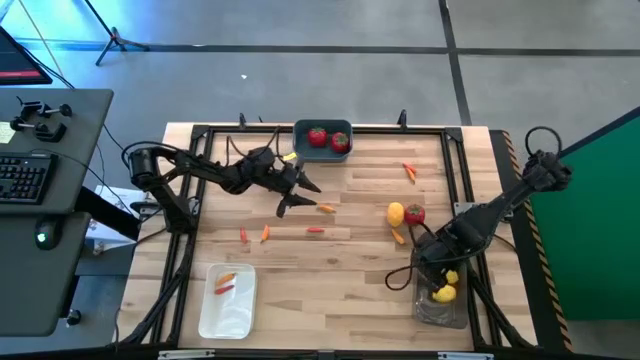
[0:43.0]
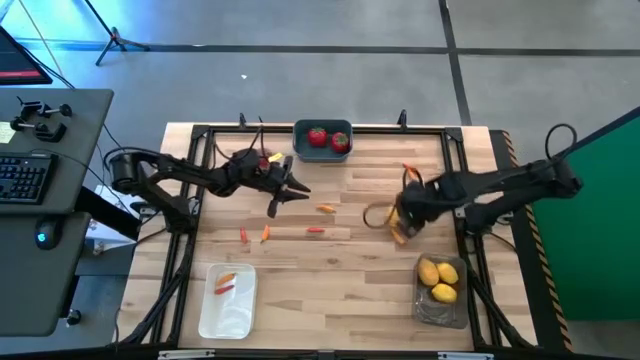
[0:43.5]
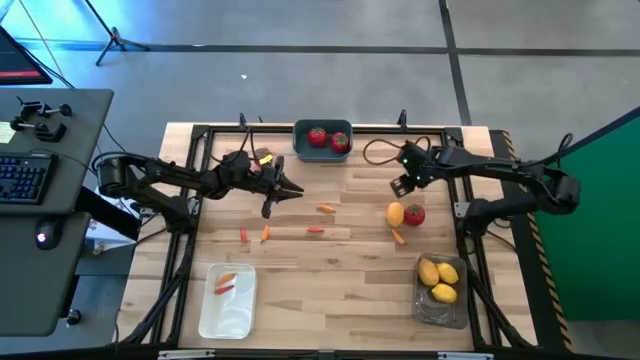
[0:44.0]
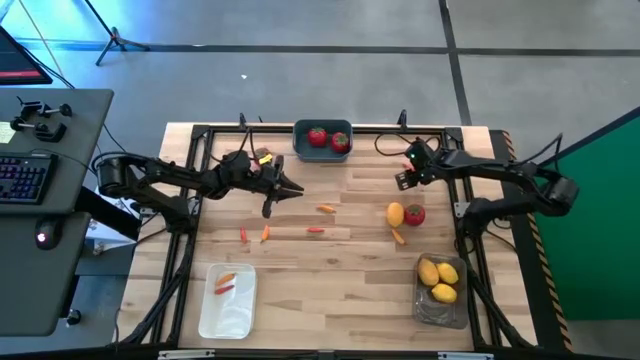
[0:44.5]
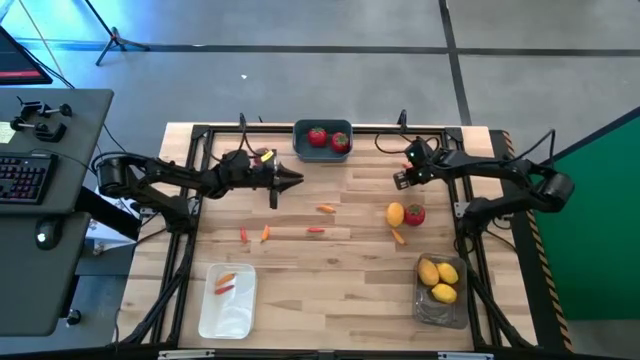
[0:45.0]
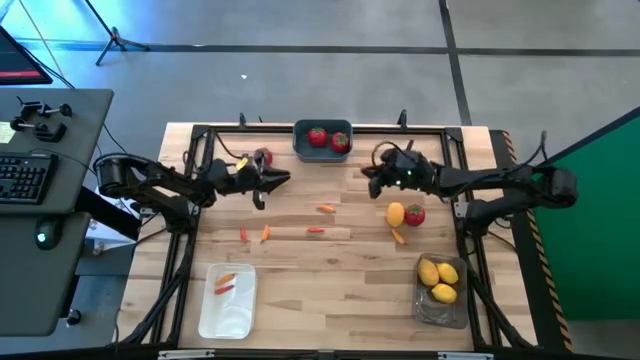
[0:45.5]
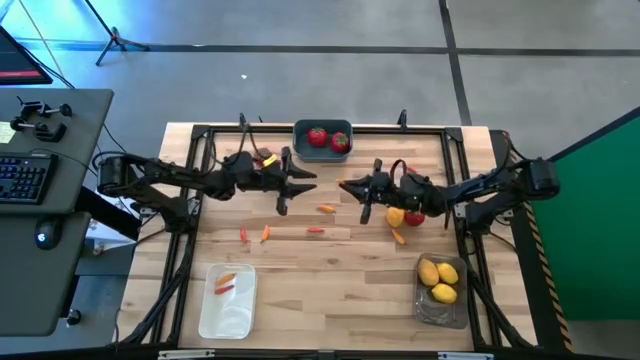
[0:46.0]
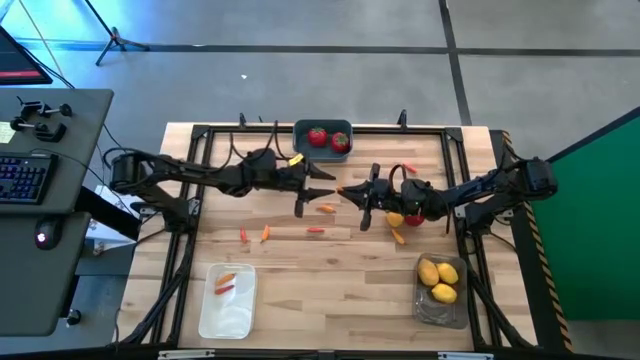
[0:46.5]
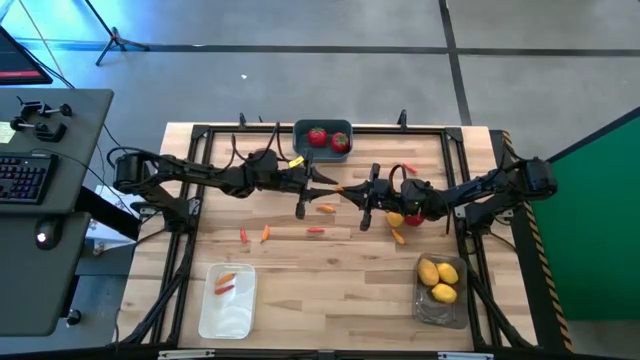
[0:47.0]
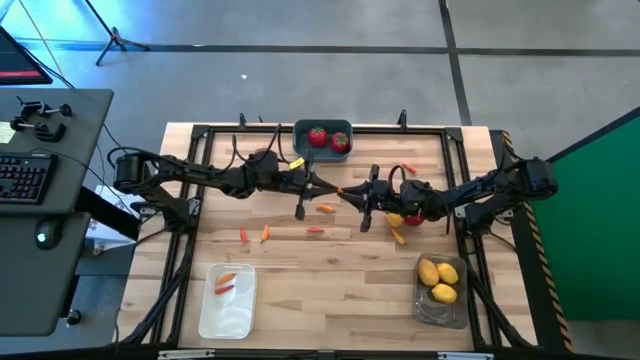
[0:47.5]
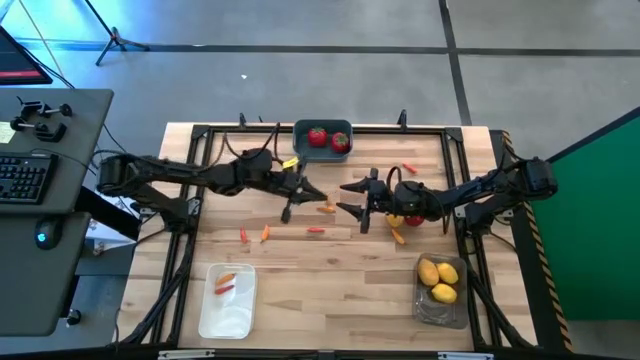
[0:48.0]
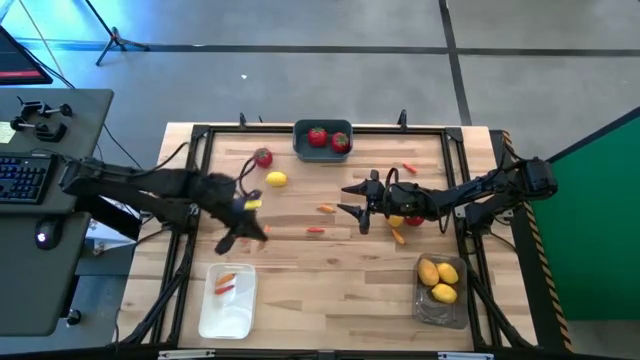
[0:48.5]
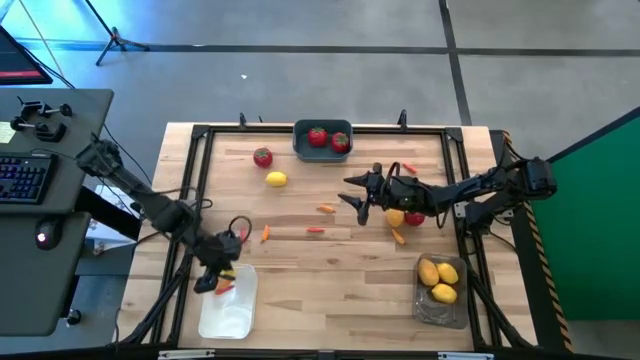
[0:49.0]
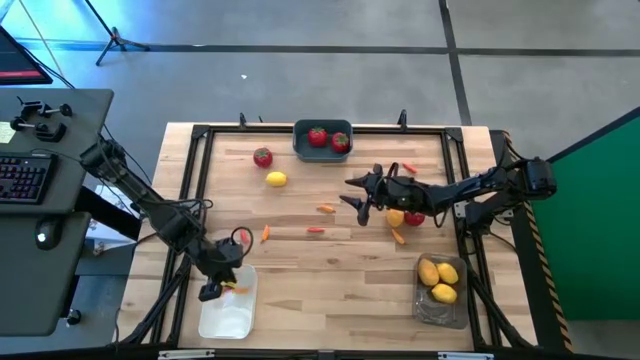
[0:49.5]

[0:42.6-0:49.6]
Task: Sort produce into baskets
Put the top right orange chili pepper into the white bin

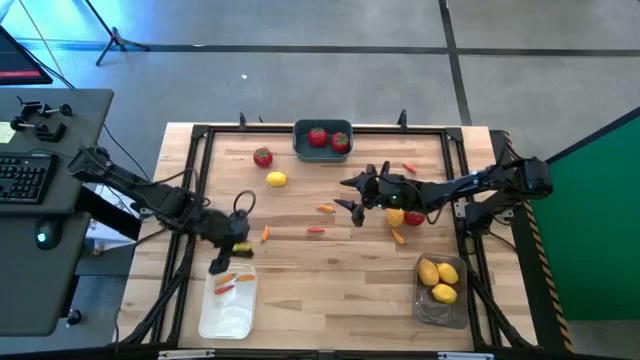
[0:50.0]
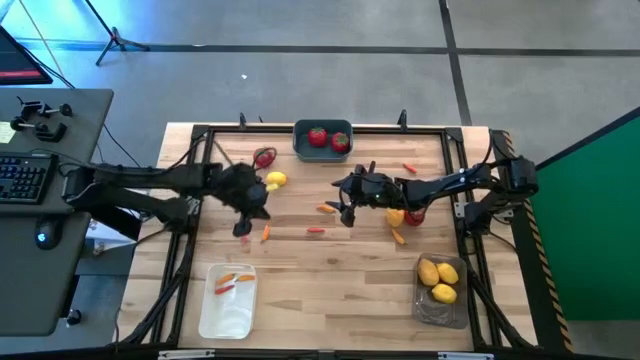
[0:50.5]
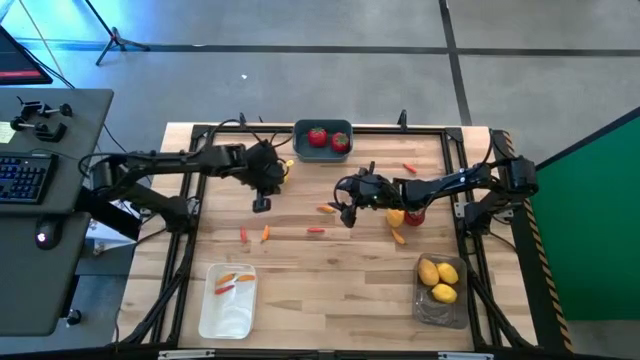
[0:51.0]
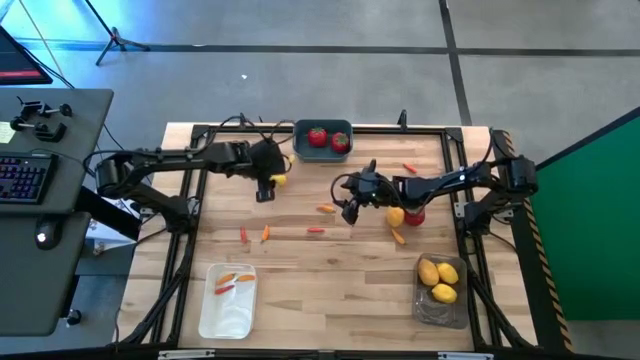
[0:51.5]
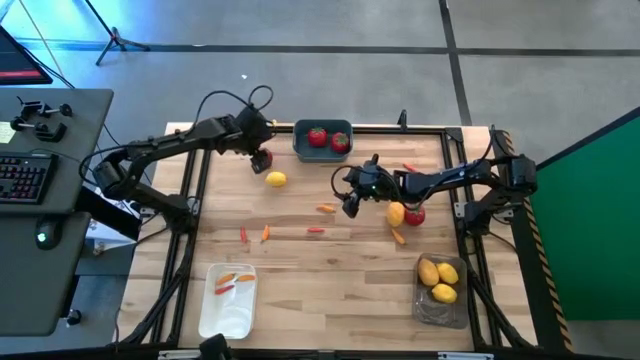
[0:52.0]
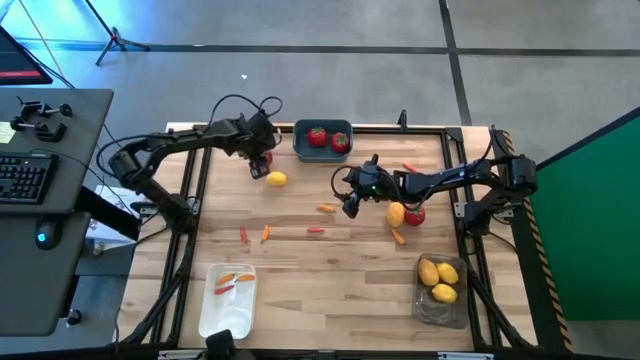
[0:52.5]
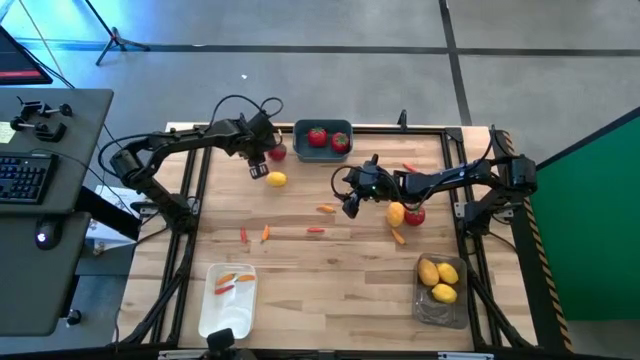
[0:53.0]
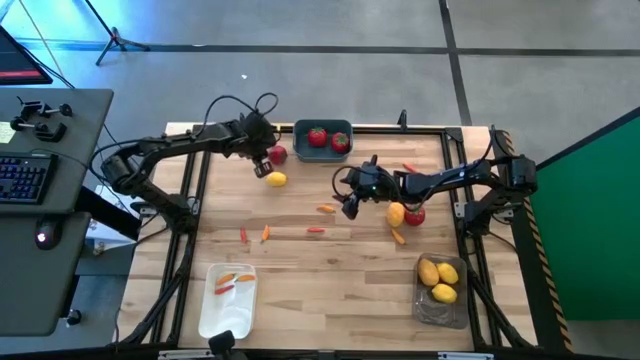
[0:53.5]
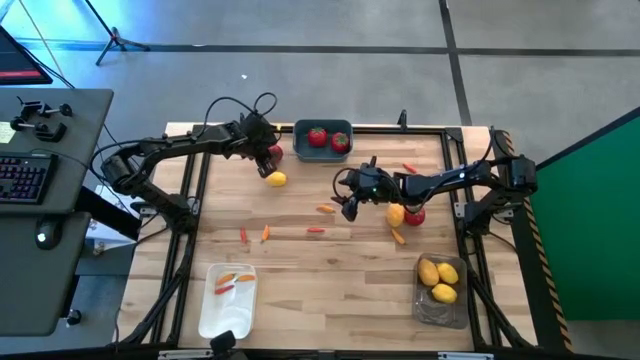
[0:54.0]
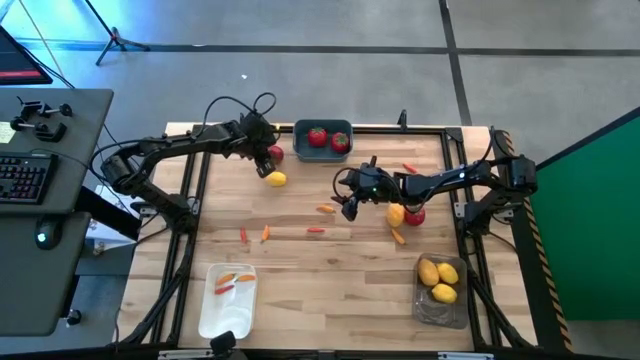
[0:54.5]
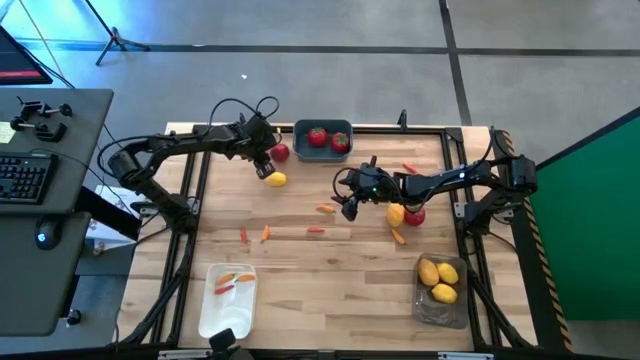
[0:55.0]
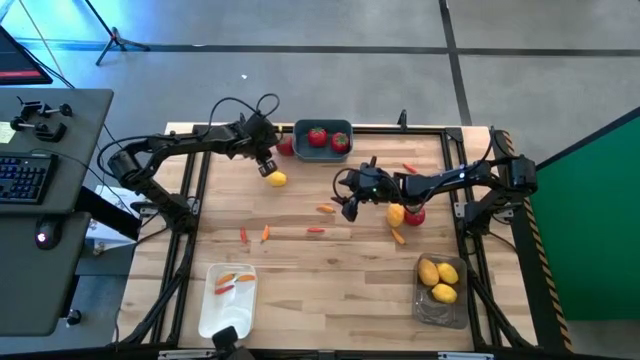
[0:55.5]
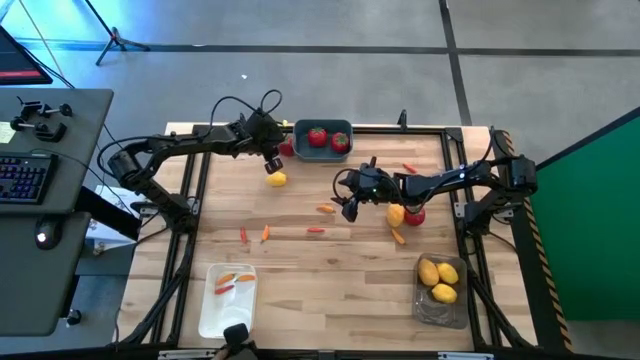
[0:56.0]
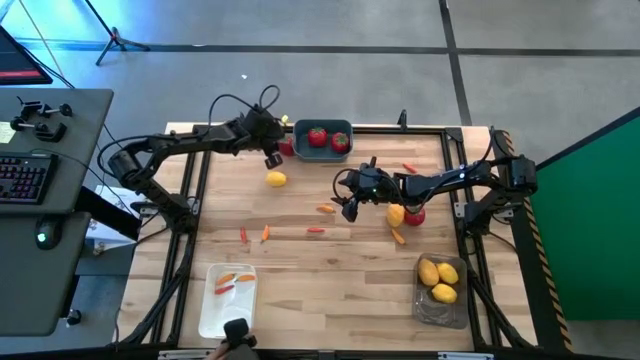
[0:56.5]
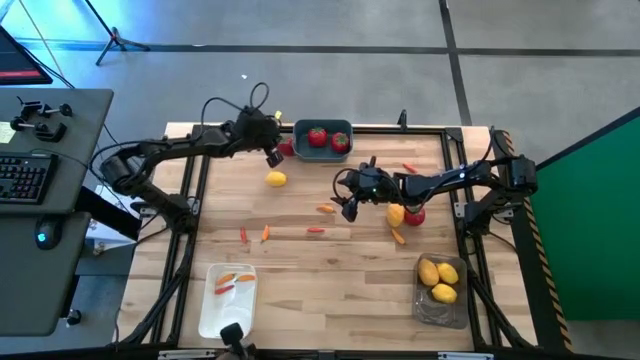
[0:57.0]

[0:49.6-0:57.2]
Put the left red tomato into the blue bin

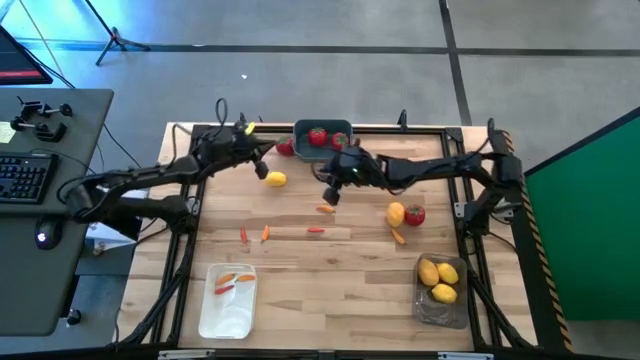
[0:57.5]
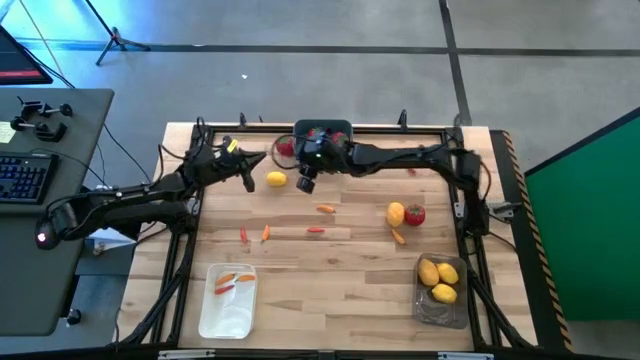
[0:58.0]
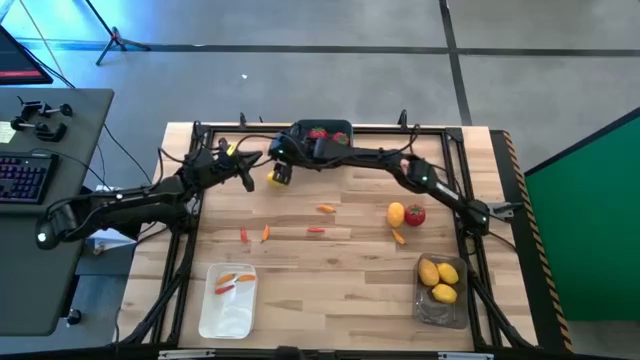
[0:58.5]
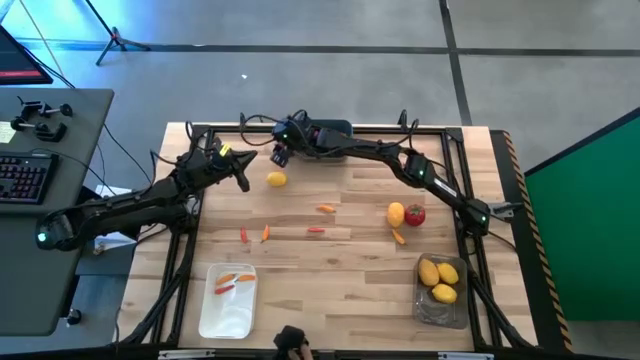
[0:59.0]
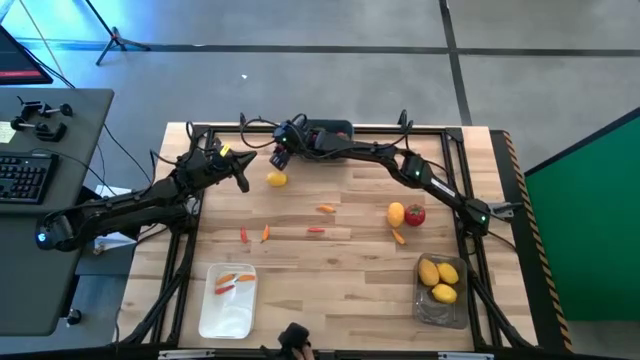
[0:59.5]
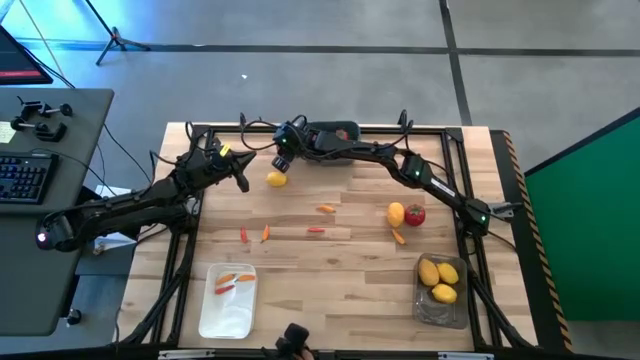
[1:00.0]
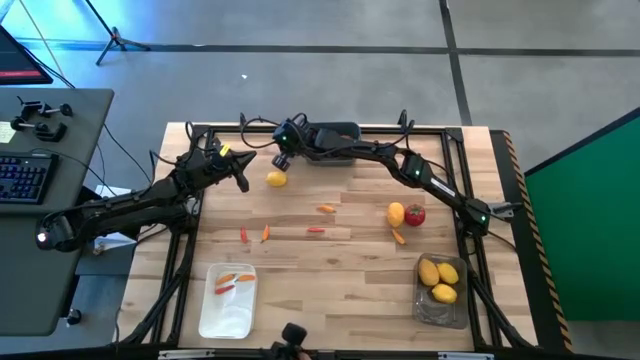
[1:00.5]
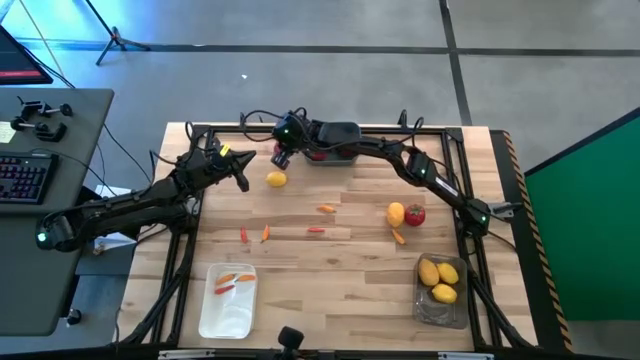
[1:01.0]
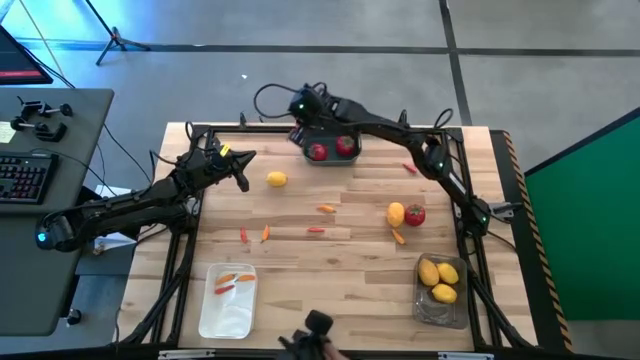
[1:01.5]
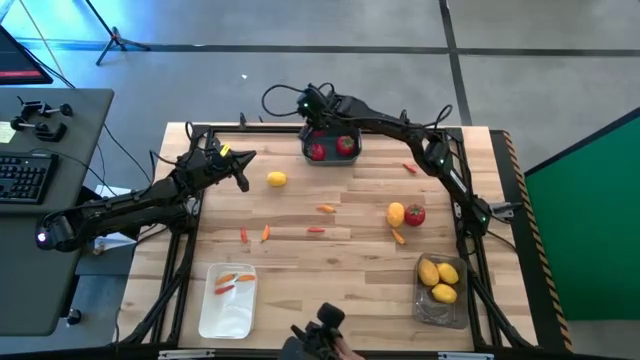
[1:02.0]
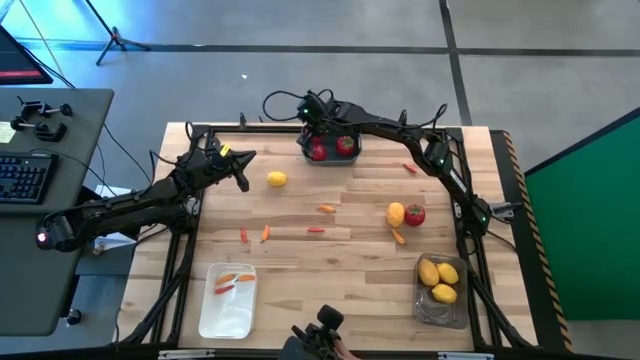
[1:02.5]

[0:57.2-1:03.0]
Put the left red tomato into the blue bin

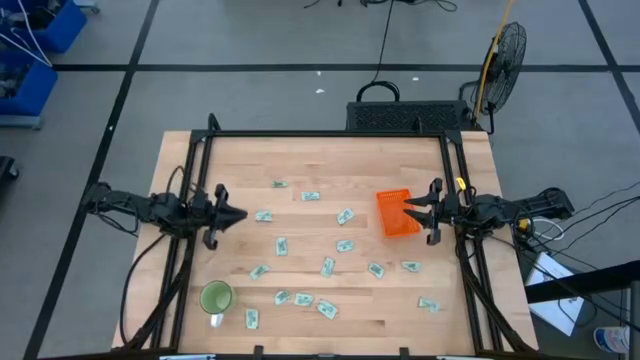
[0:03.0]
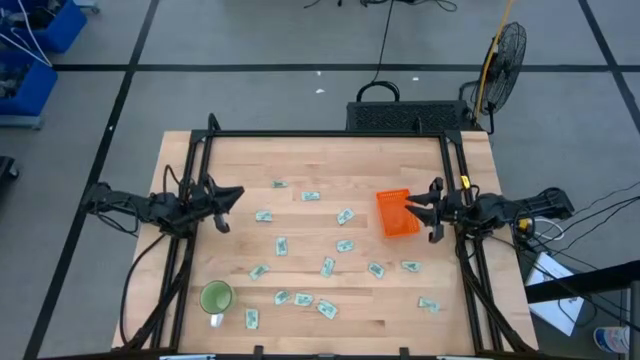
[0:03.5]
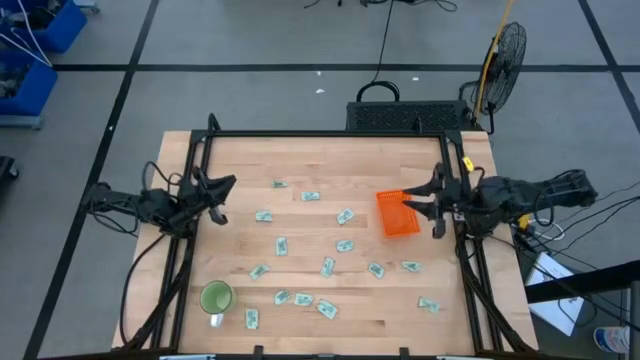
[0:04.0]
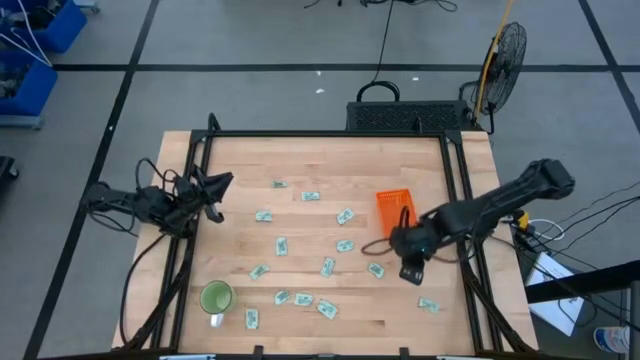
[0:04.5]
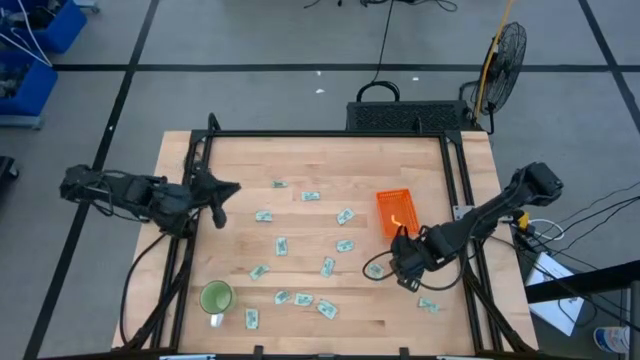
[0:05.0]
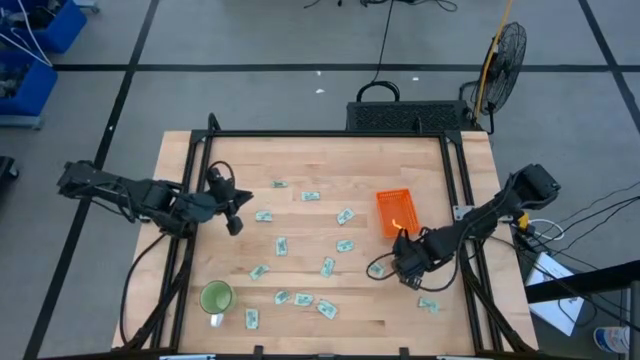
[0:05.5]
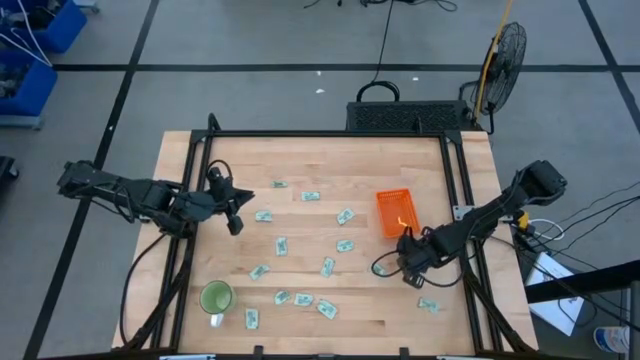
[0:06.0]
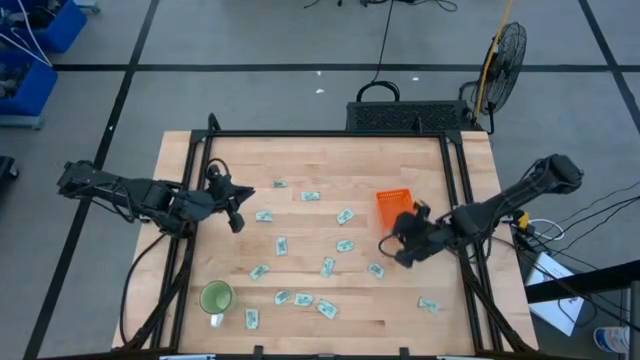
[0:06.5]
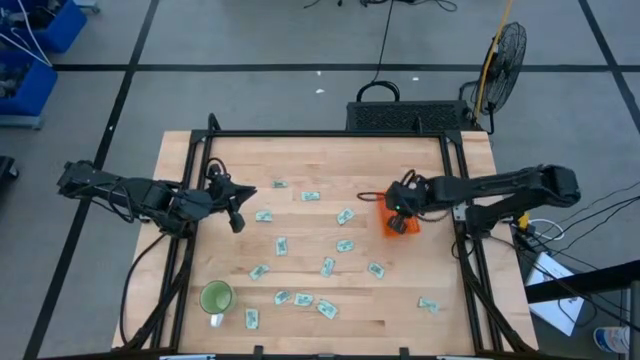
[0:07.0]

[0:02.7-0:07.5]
Task: Pick and place Stevia / Truvia into bins
Put the stevia packet into the orange basket
